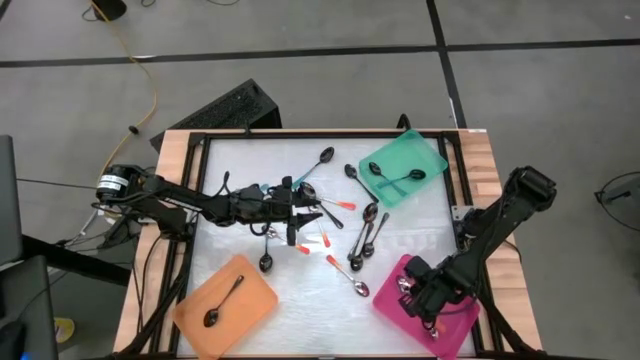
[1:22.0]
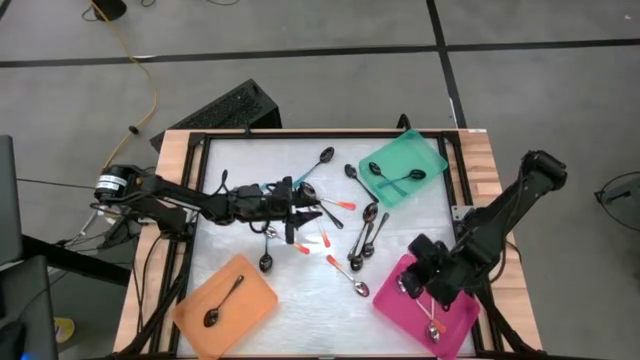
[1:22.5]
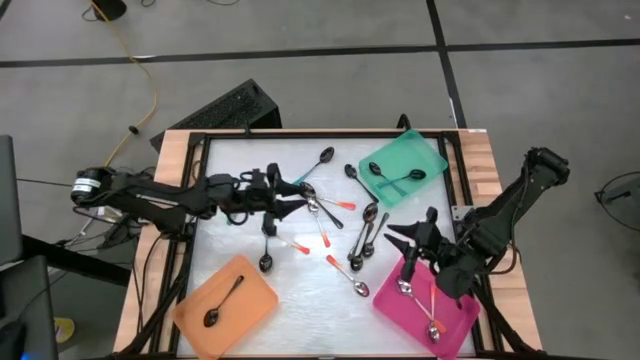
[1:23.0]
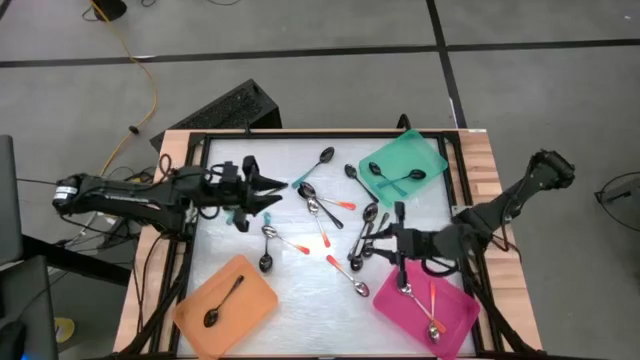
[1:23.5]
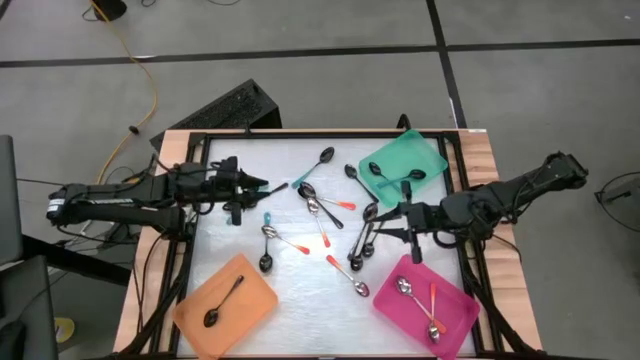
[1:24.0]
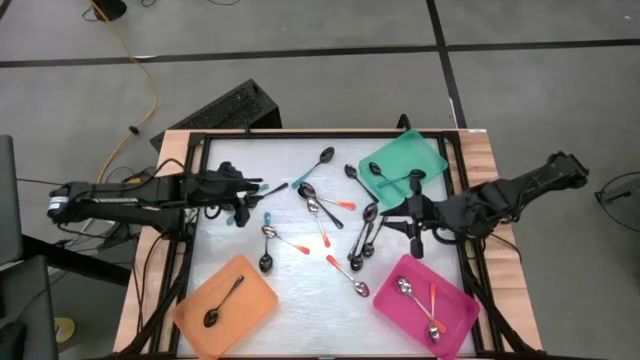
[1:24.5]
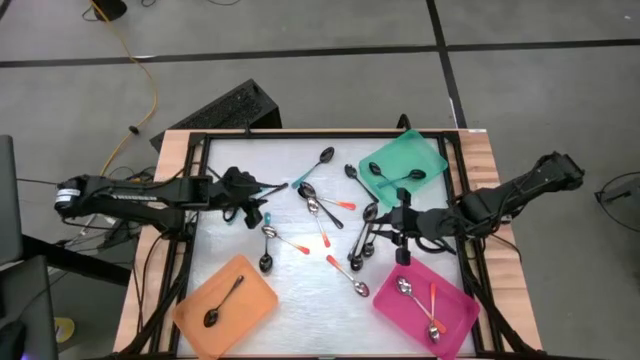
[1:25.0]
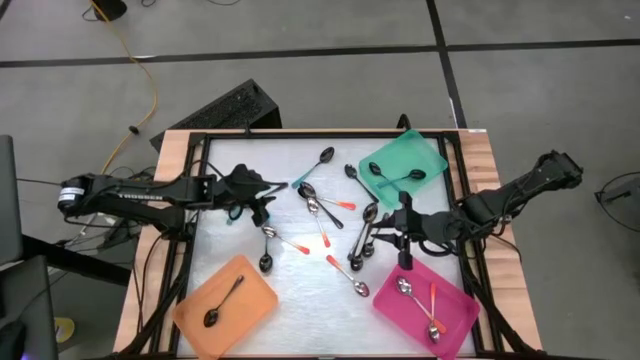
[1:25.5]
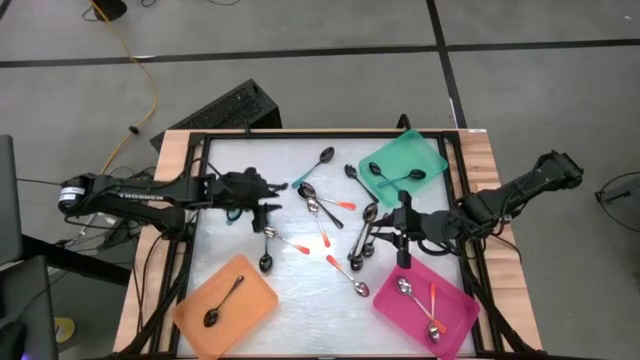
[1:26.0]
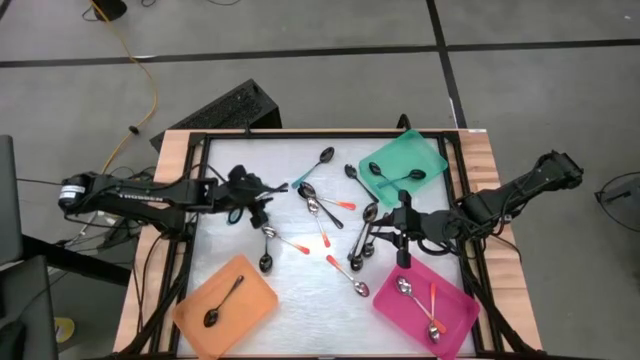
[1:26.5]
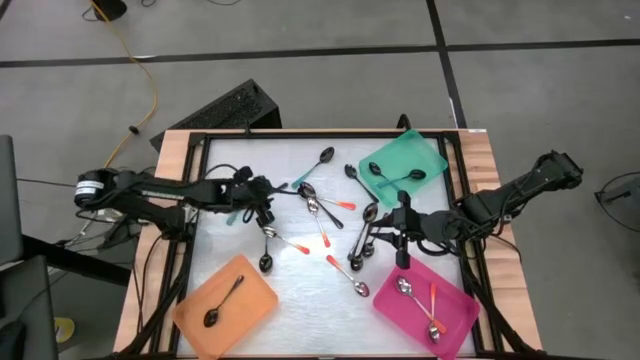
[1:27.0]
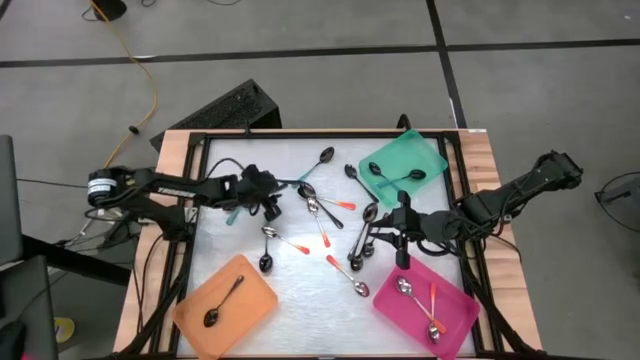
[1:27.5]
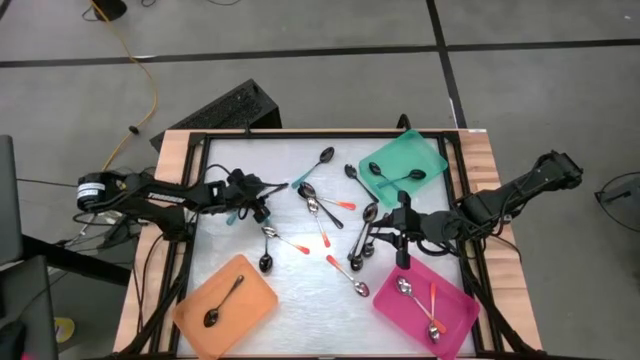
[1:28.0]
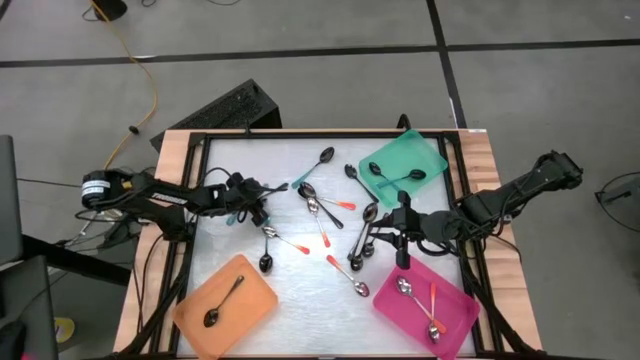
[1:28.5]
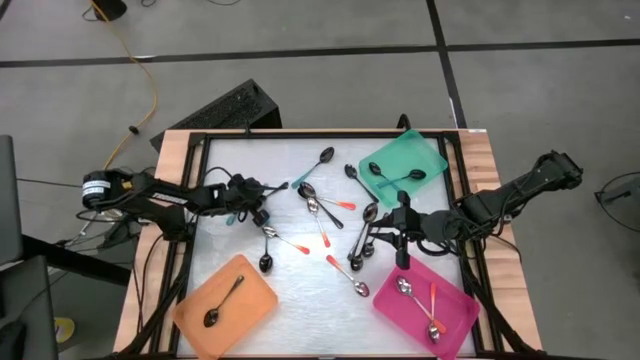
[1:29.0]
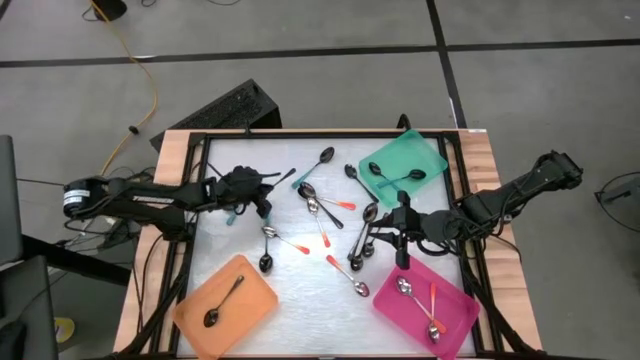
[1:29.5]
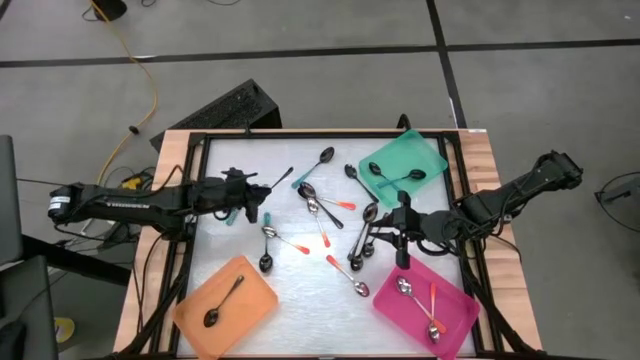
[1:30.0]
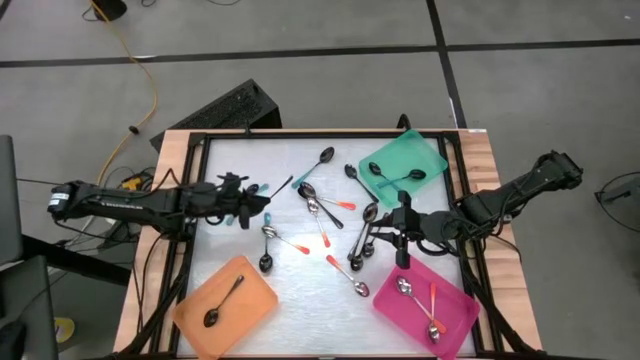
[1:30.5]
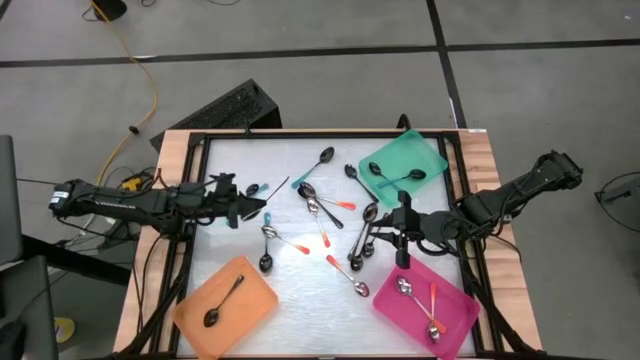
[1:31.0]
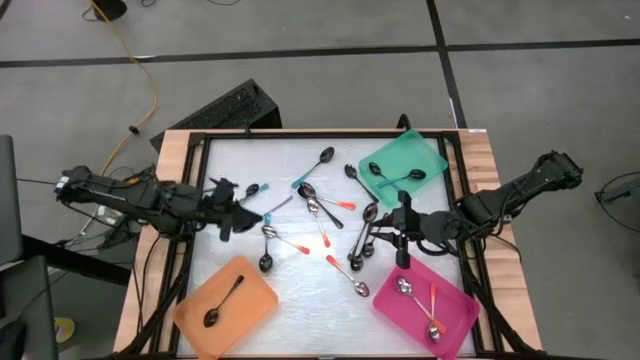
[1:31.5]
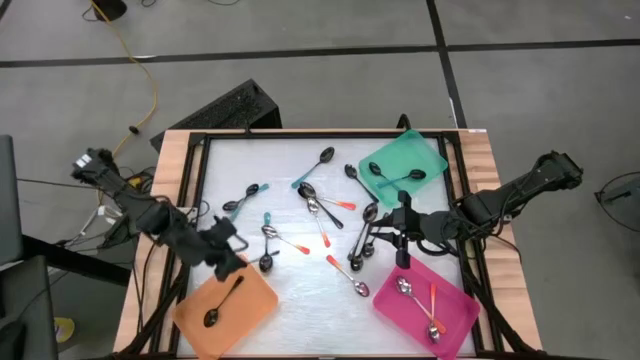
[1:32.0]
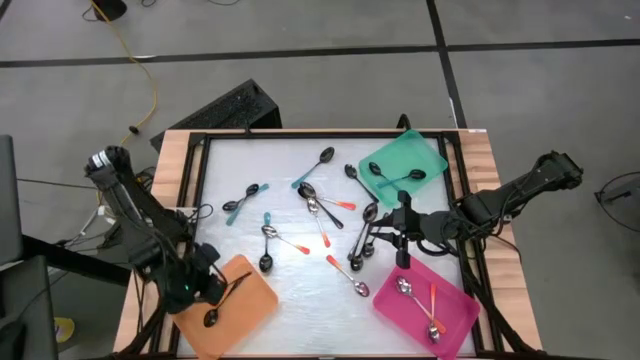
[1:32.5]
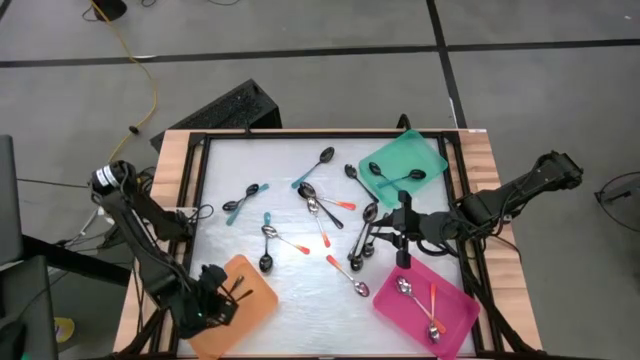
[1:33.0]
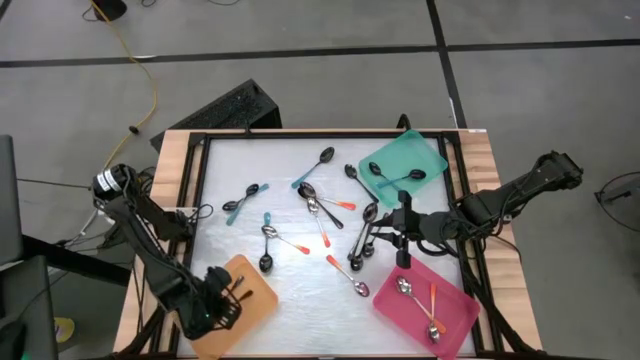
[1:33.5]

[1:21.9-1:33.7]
Task: Sort silverware by color (type)
Put the black spoon into the orange bin

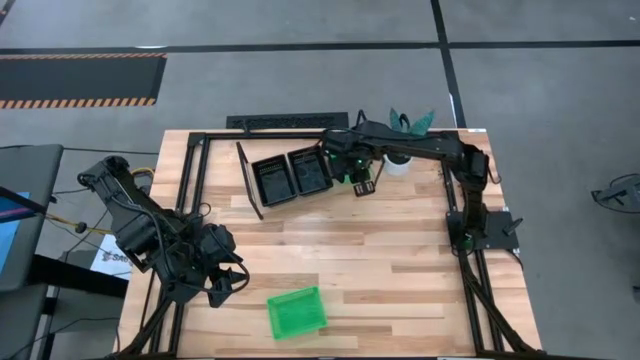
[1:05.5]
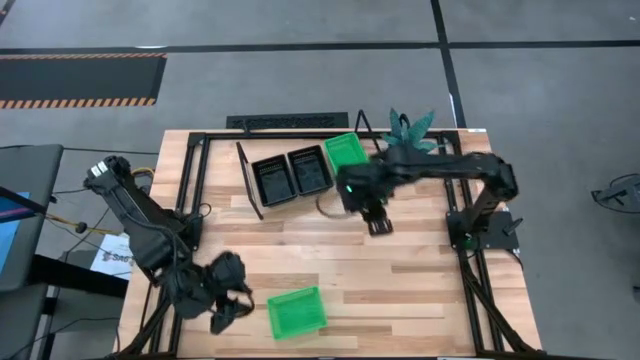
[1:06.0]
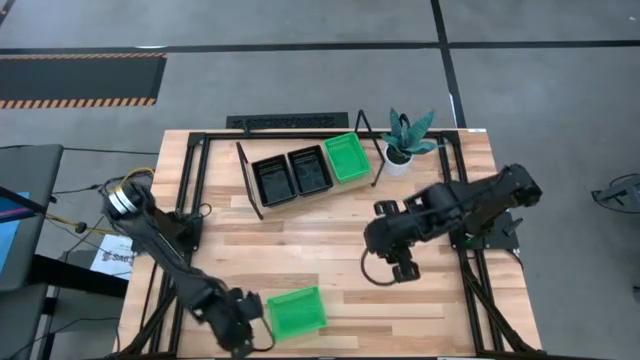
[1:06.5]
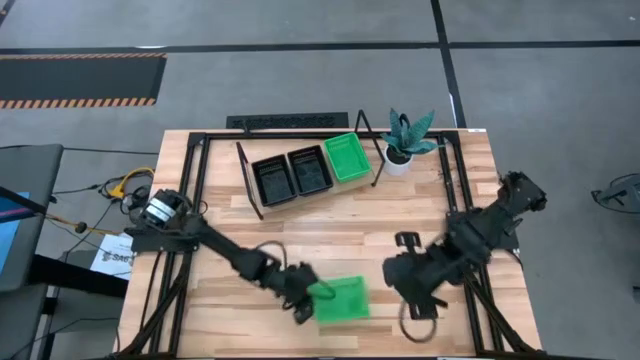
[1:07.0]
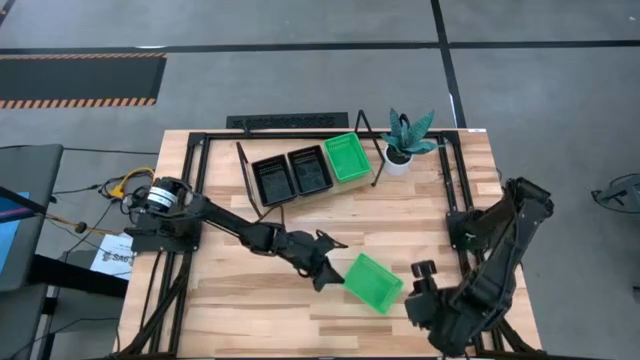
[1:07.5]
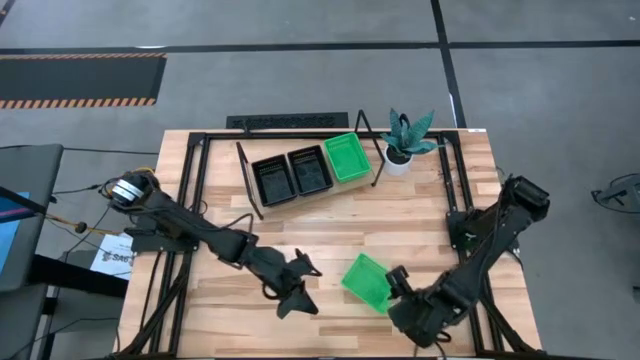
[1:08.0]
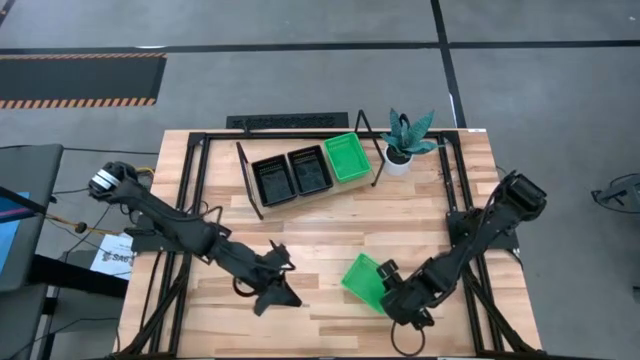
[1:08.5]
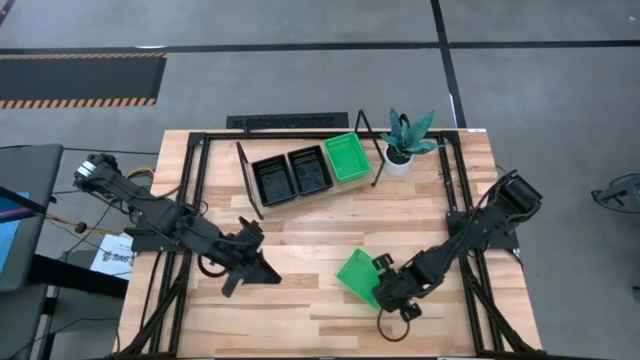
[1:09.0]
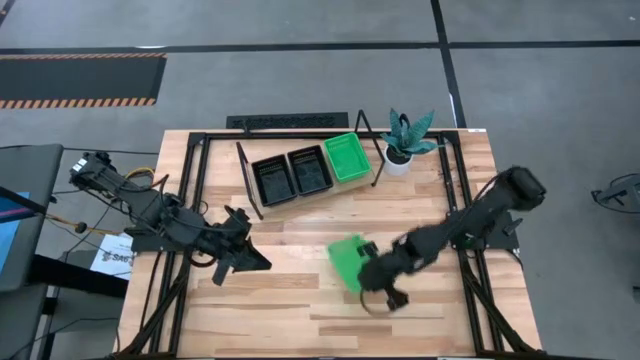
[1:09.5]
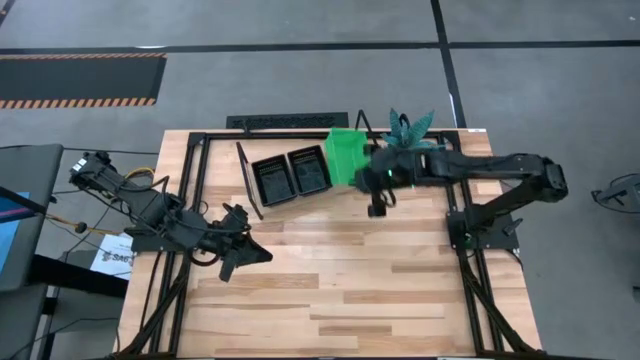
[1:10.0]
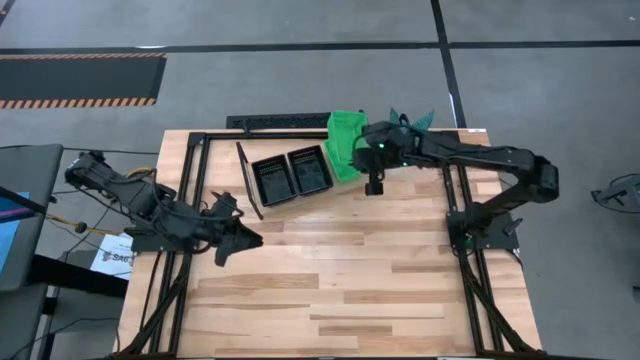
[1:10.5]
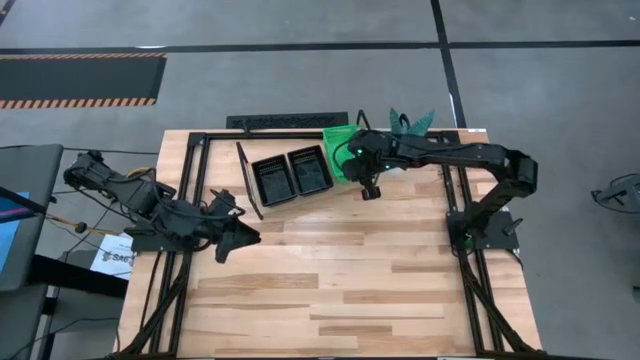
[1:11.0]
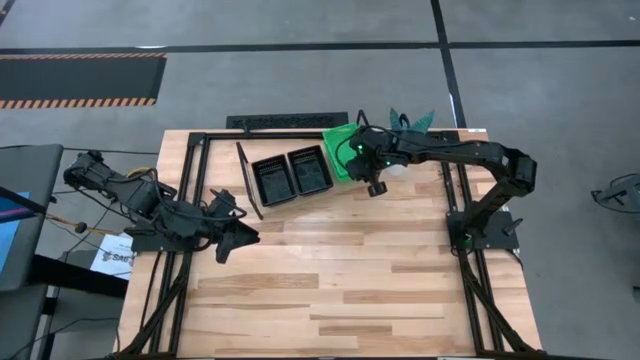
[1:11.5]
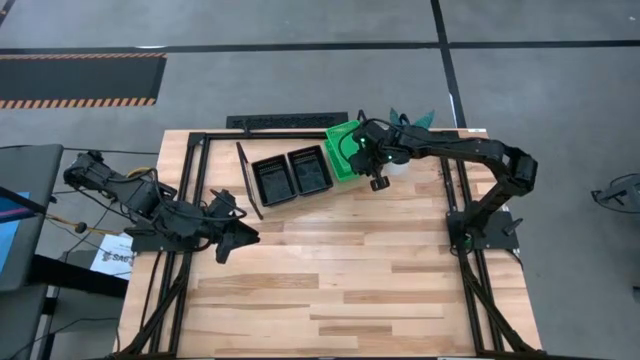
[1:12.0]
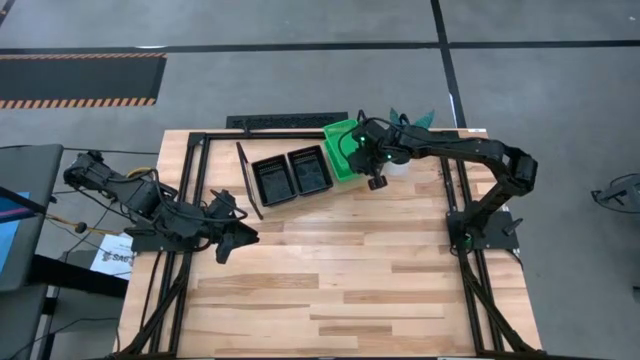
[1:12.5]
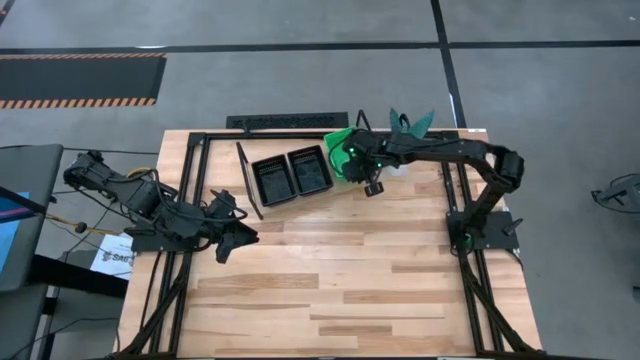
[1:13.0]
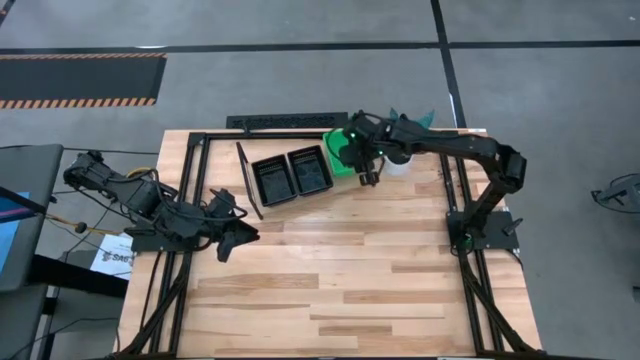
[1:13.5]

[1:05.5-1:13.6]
Task: Stack baskets on shelf by color
Stack the green bin on the green bin on the shelf
